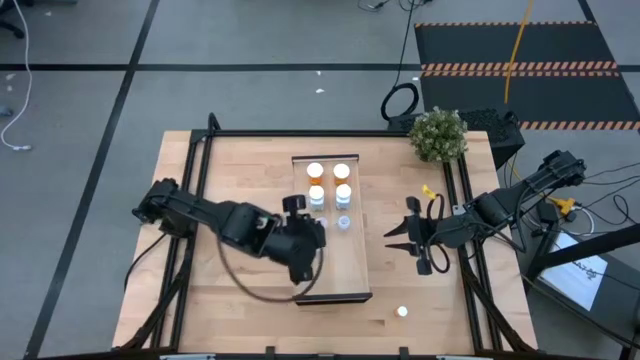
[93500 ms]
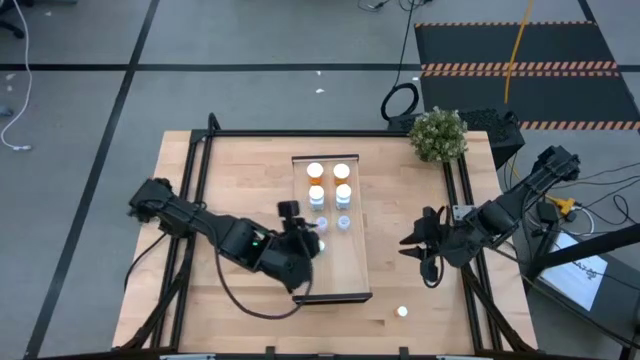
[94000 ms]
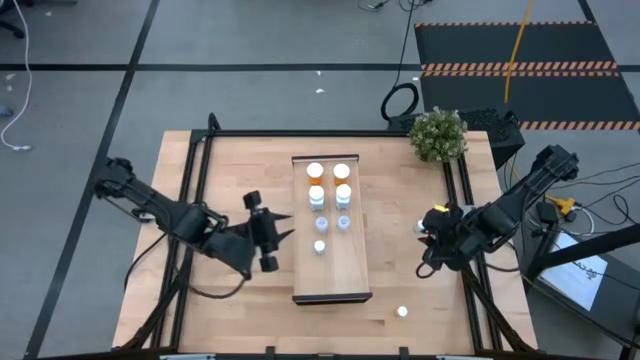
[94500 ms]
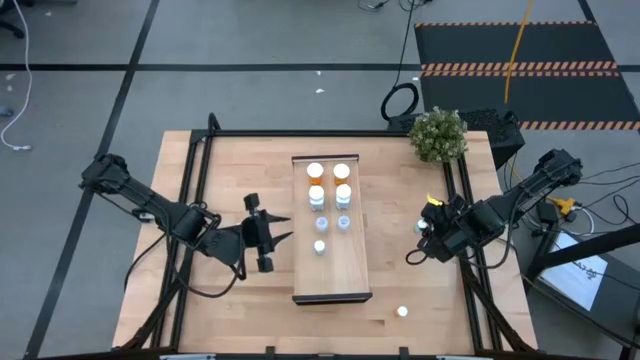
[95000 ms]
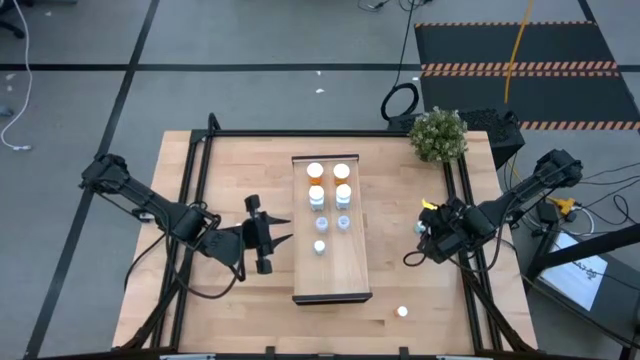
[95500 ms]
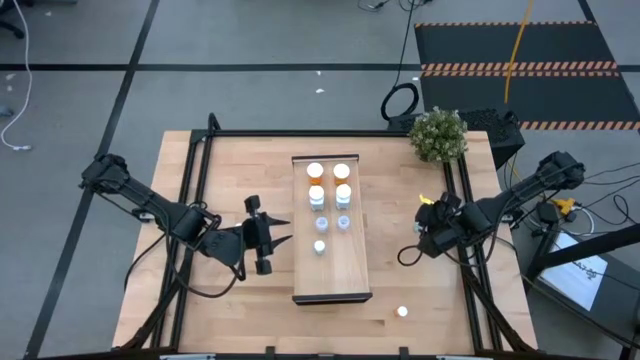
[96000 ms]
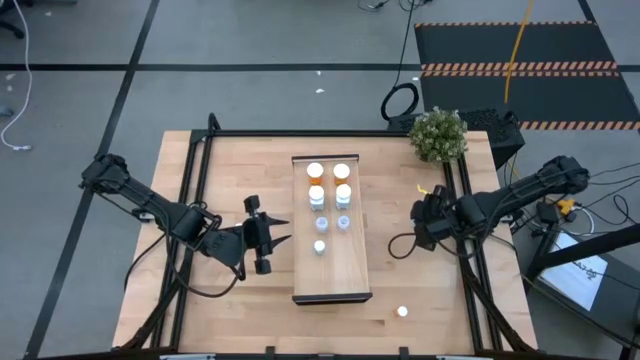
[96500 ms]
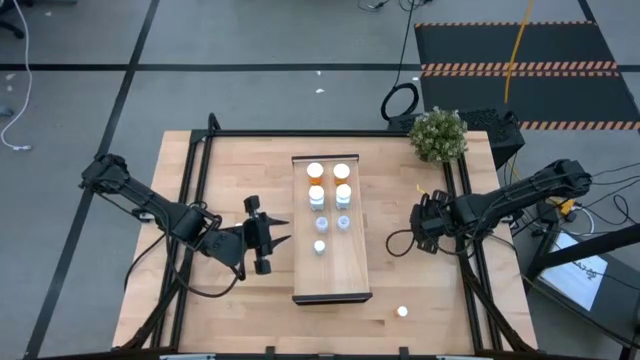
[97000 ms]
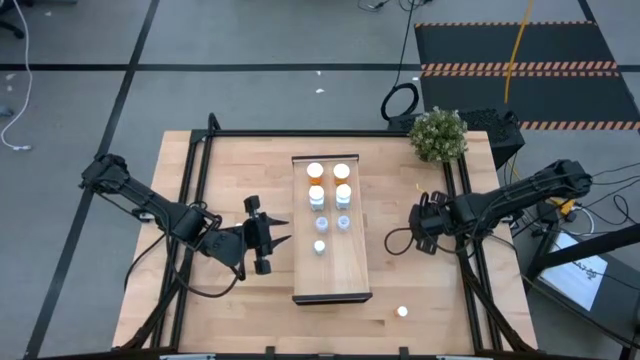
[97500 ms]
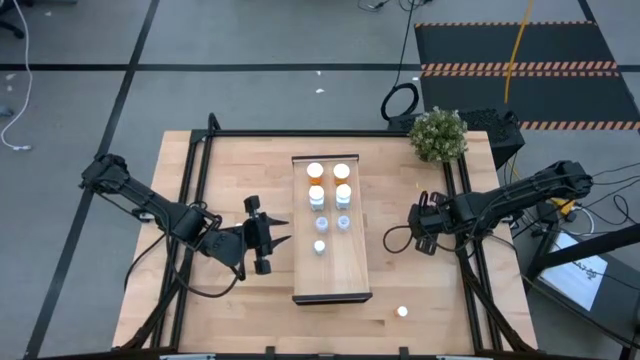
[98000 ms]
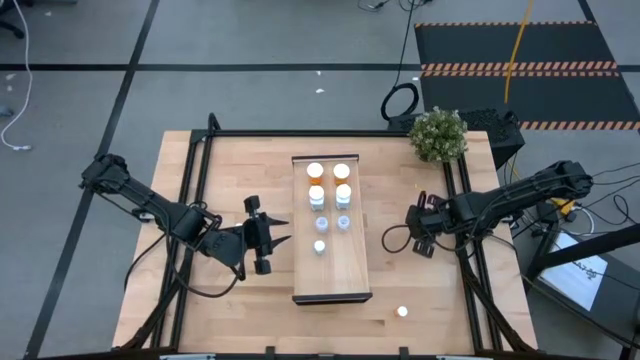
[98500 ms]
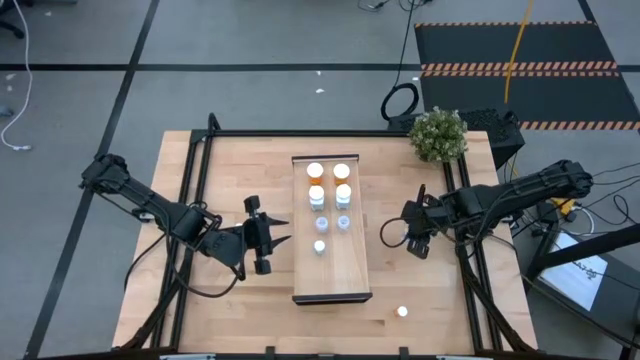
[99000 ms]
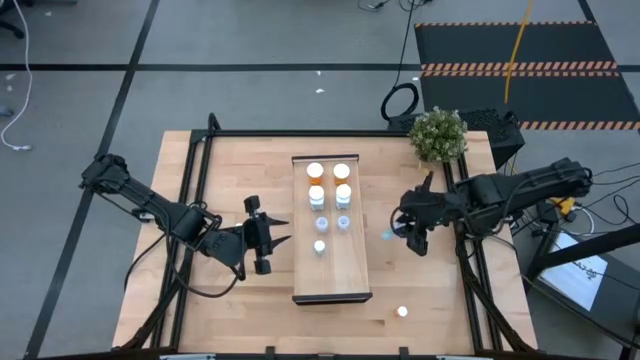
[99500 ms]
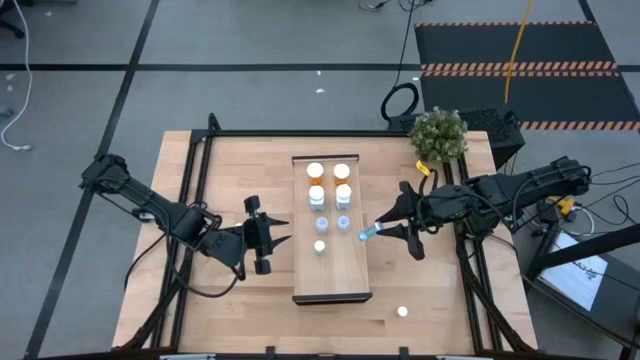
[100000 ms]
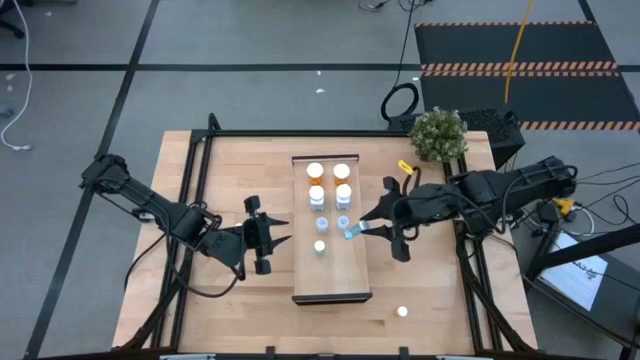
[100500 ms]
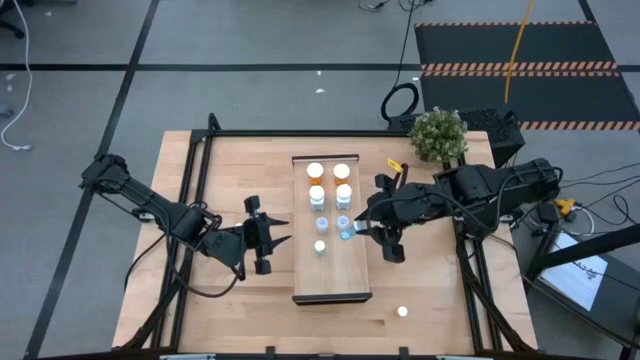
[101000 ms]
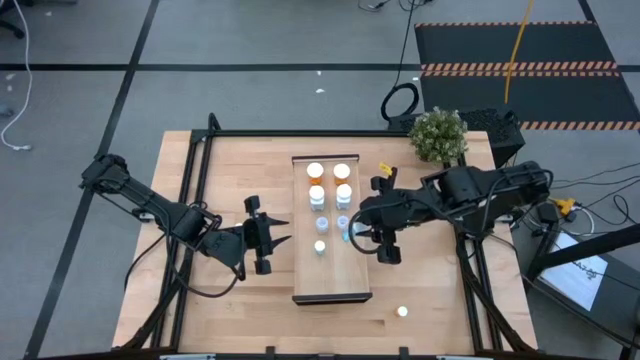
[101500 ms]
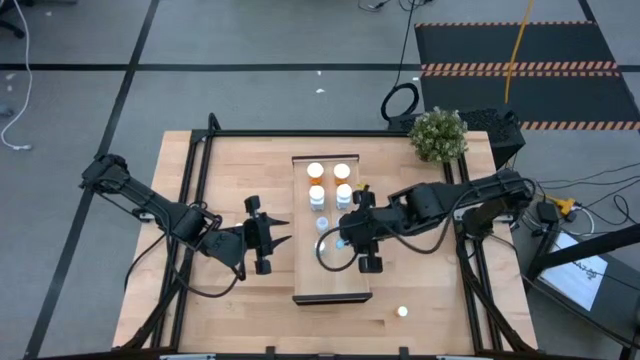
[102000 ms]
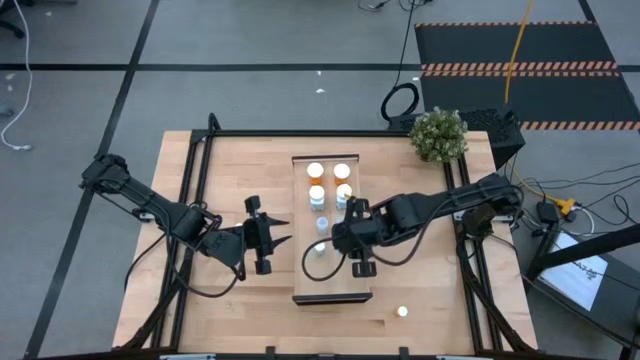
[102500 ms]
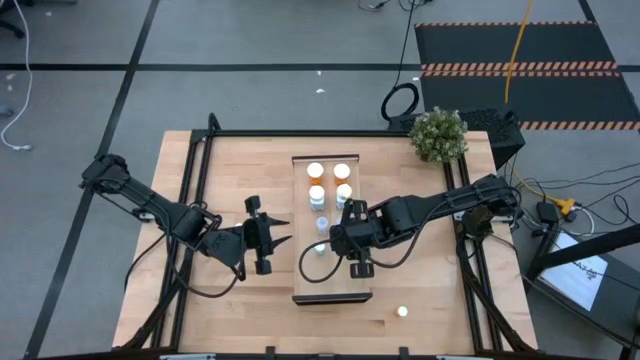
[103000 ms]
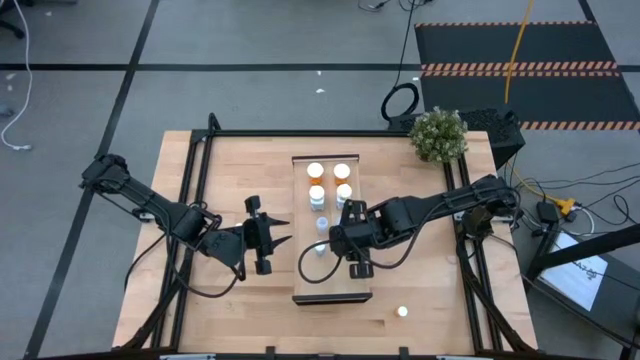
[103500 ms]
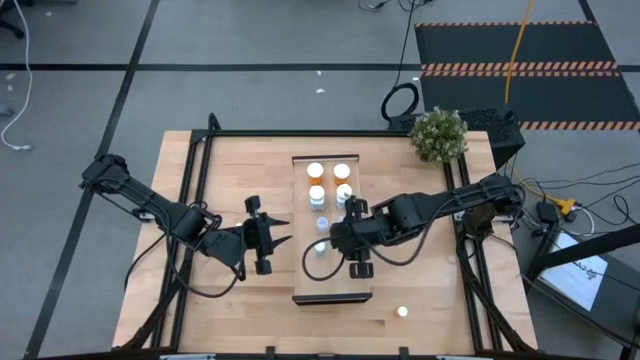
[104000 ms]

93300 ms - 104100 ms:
Task: Pick and place medicine bottles onto shelf by color
Put the blue pill bottle on the shelf aligned with the other blue pill bottle

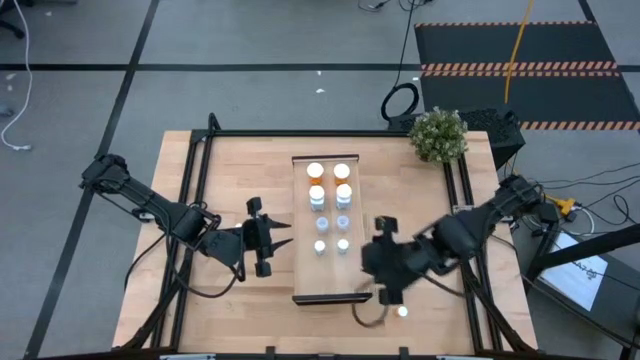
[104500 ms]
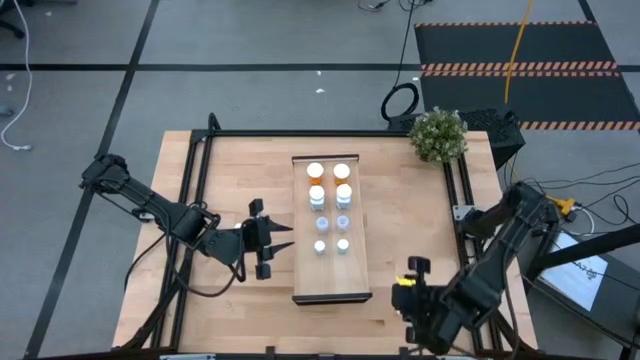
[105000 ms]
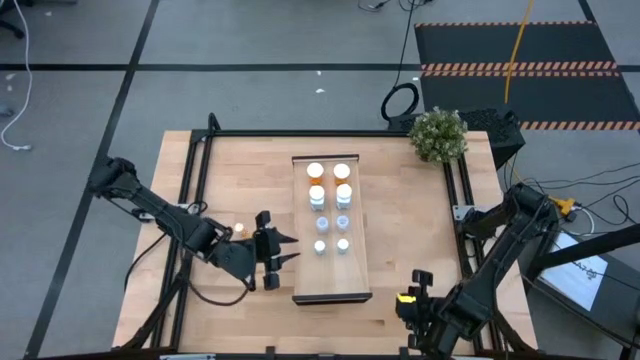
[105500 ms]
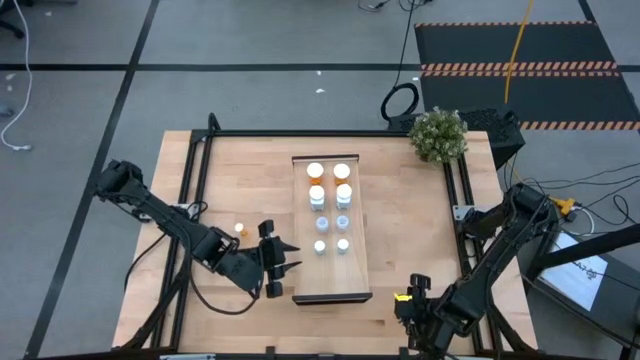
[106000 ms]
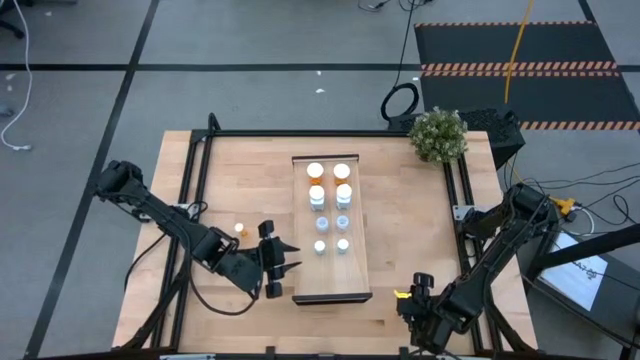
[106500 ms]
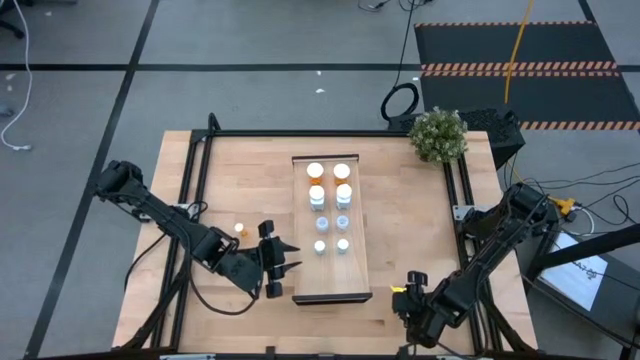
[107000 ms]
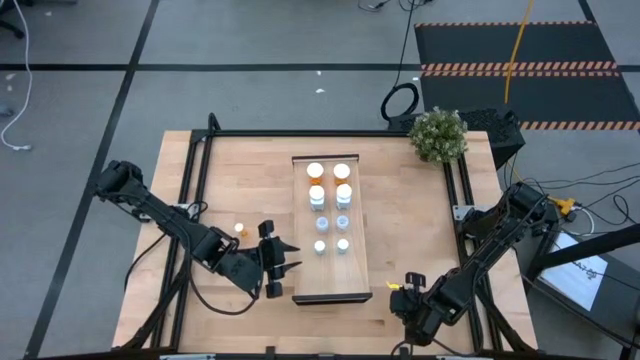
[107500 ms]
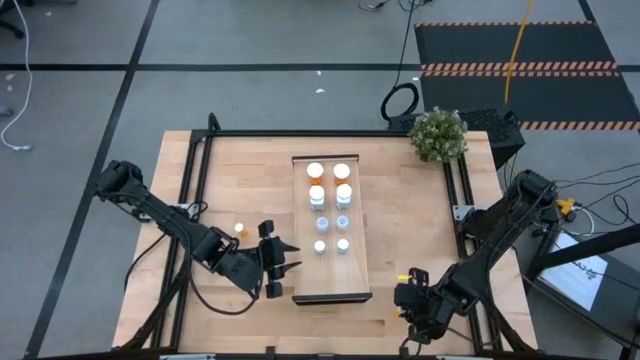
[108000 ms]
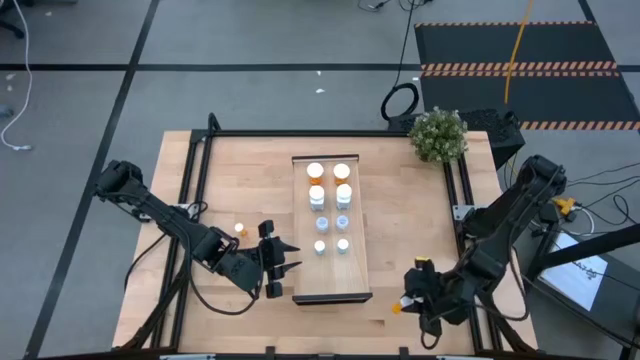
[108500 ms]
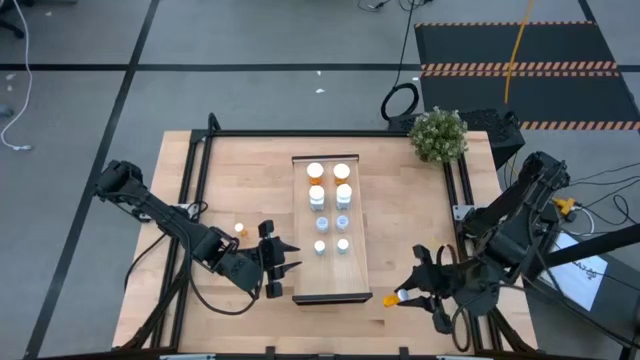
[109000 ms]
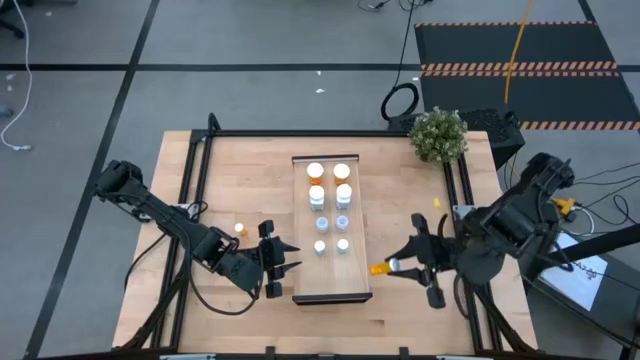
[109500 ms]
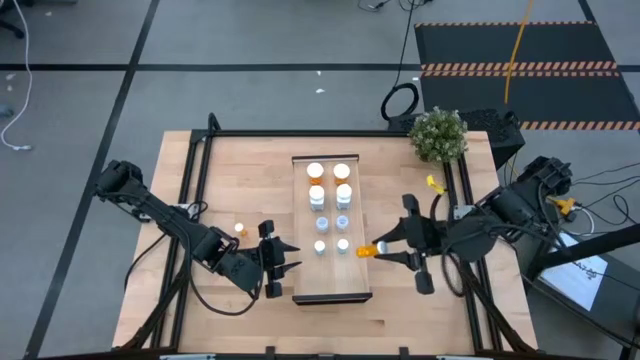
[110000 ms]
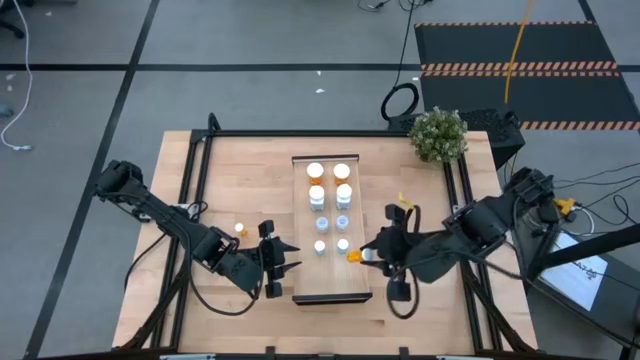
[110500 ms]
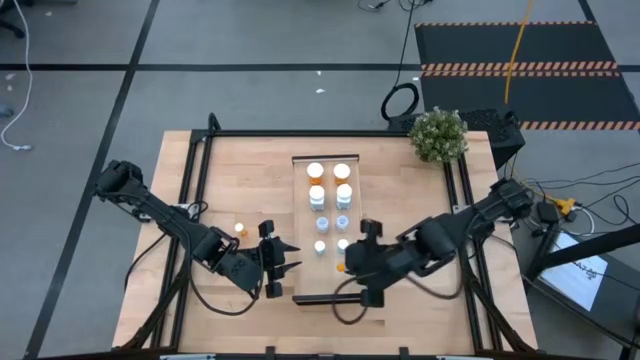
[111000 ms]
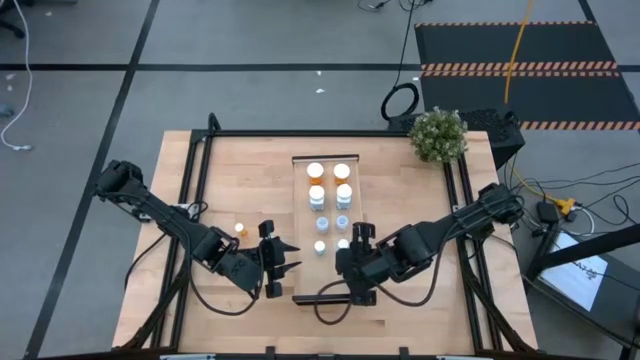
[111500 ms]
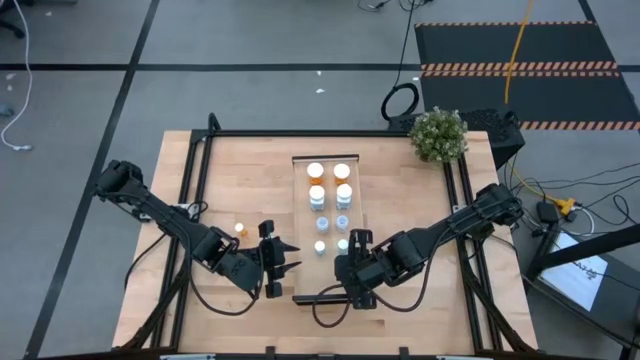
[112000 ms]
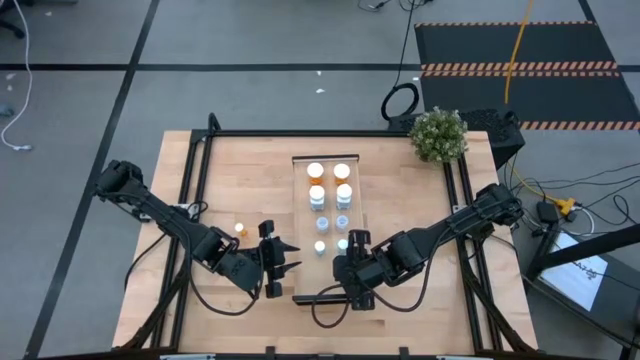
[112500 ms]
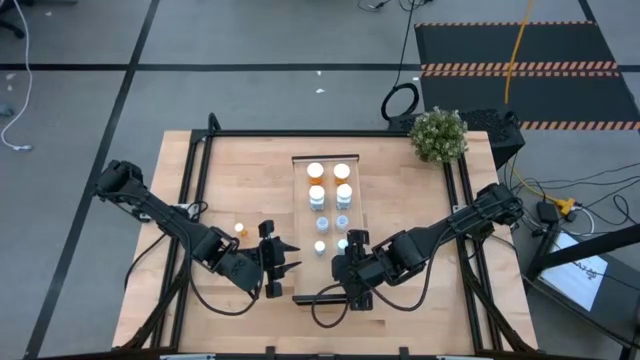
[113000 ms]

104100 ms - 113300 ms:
Put the bottom small orange pill bottle on the shelf
